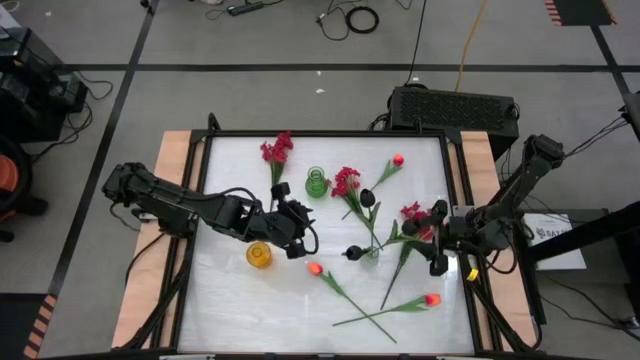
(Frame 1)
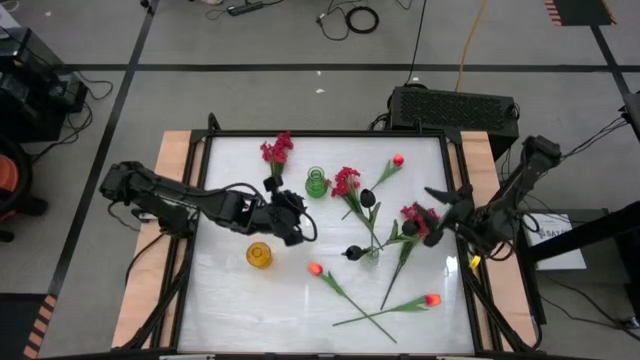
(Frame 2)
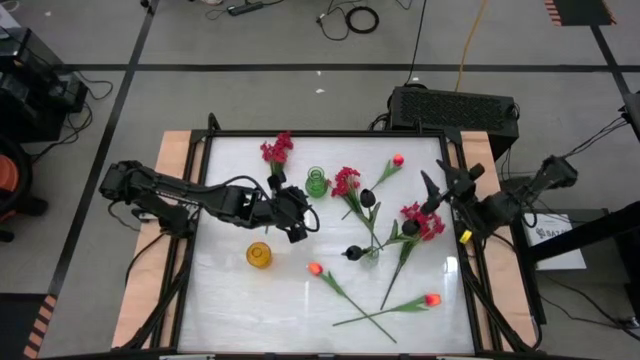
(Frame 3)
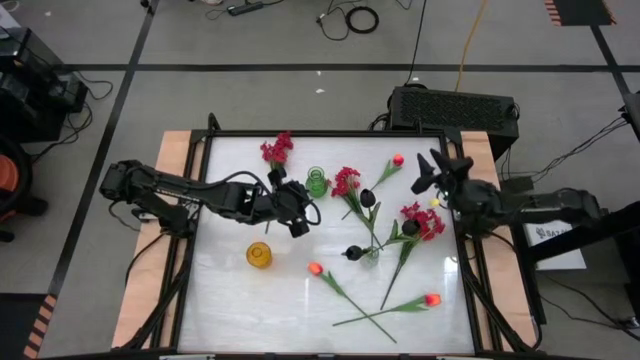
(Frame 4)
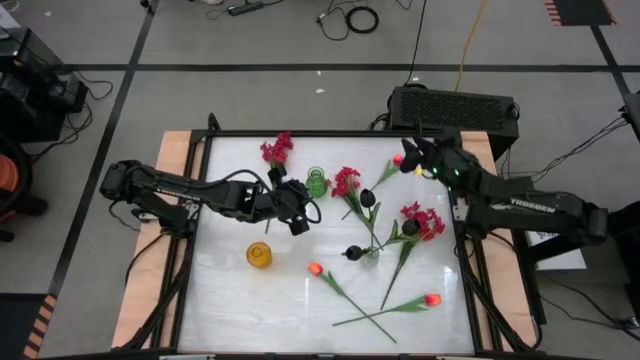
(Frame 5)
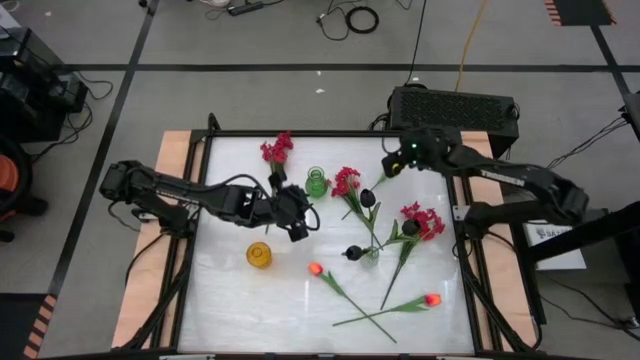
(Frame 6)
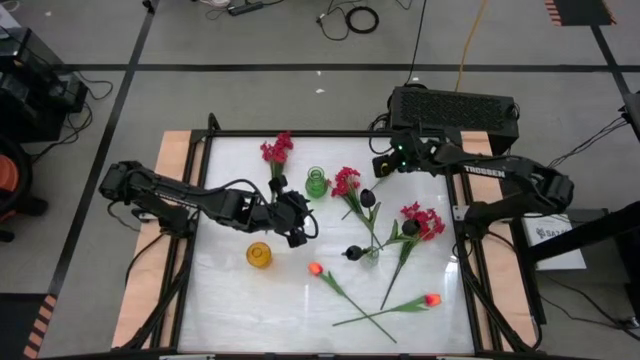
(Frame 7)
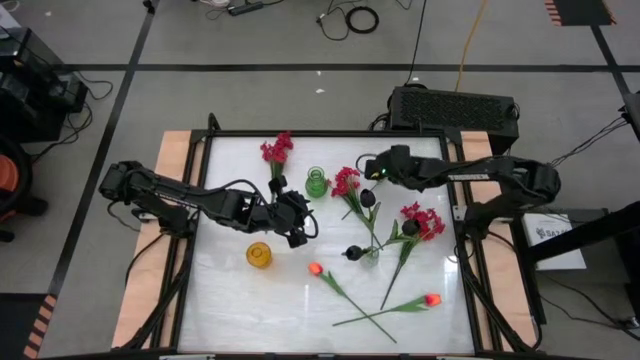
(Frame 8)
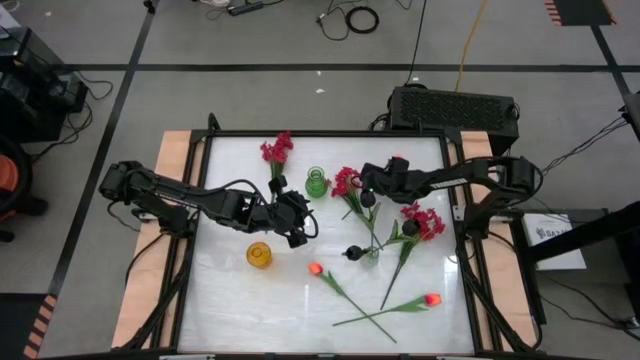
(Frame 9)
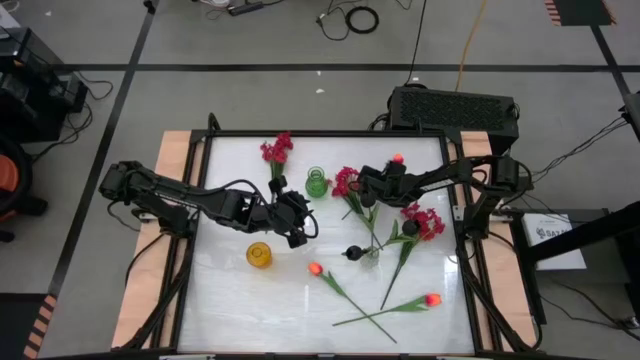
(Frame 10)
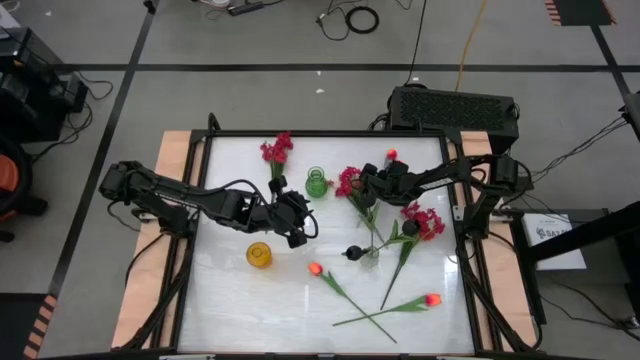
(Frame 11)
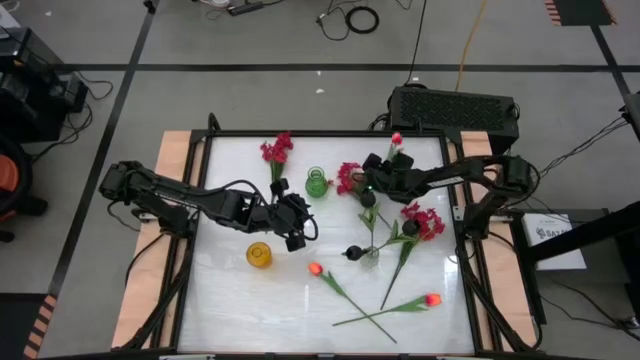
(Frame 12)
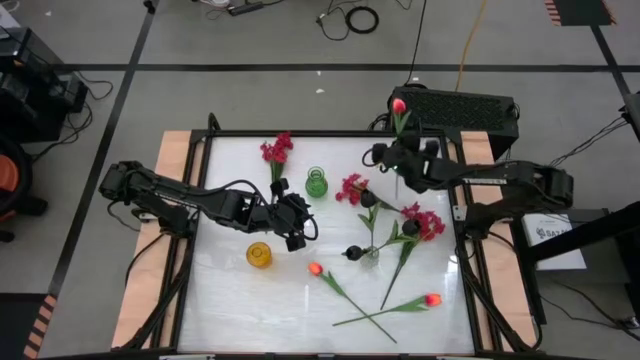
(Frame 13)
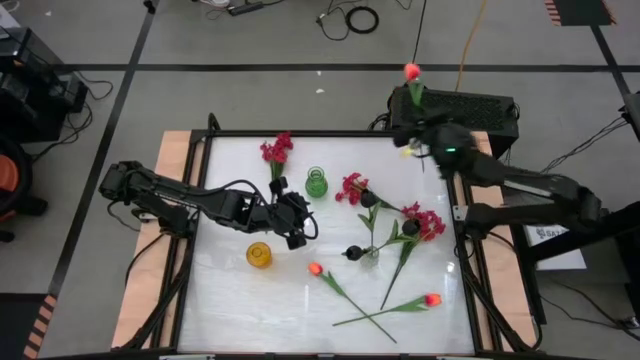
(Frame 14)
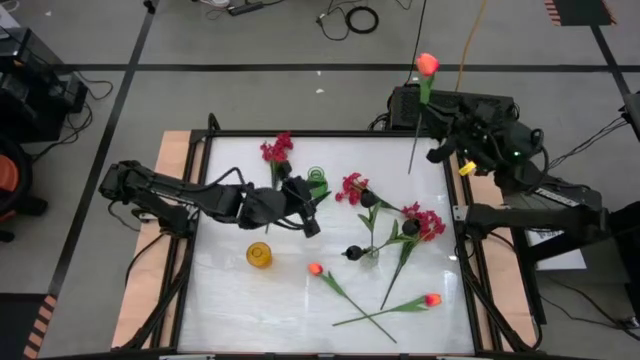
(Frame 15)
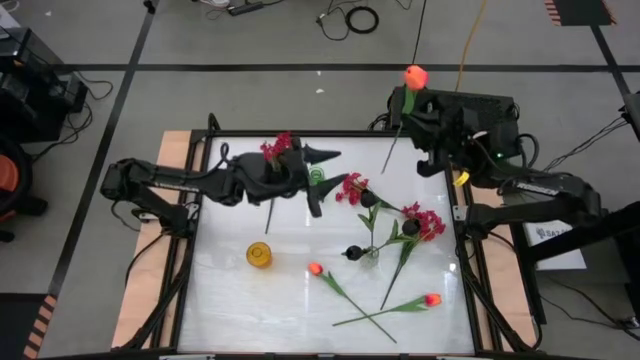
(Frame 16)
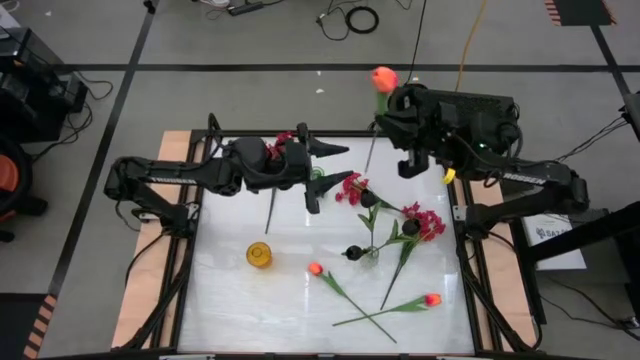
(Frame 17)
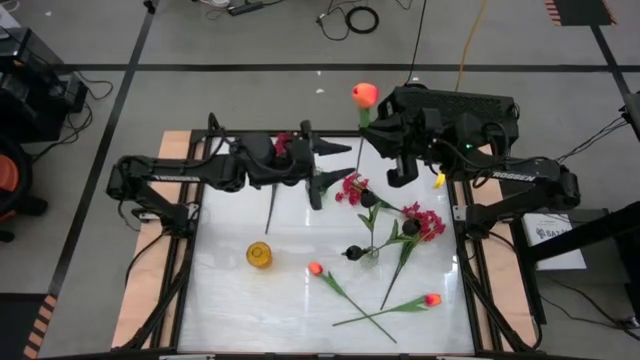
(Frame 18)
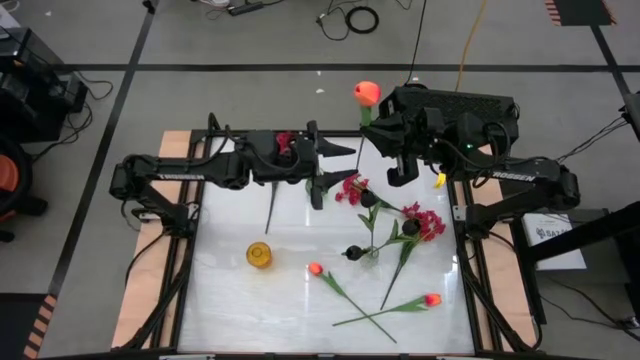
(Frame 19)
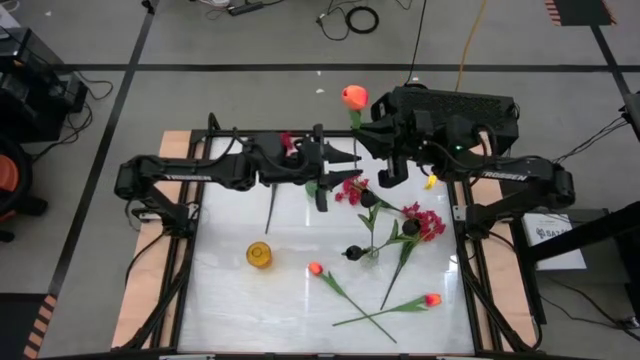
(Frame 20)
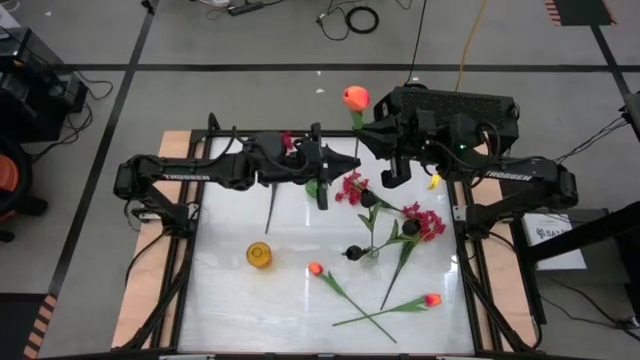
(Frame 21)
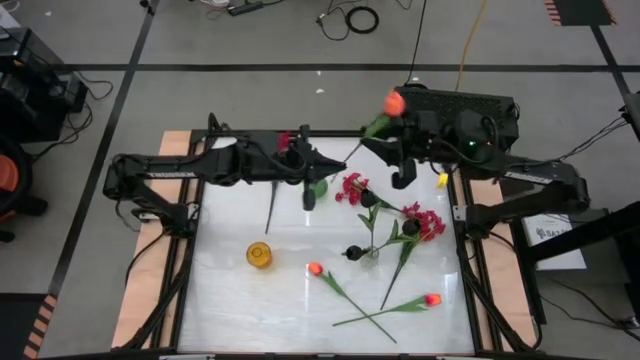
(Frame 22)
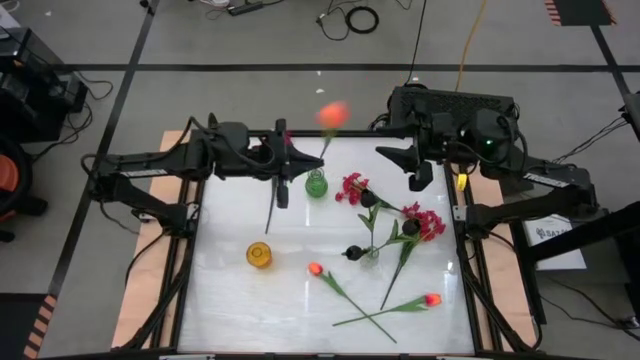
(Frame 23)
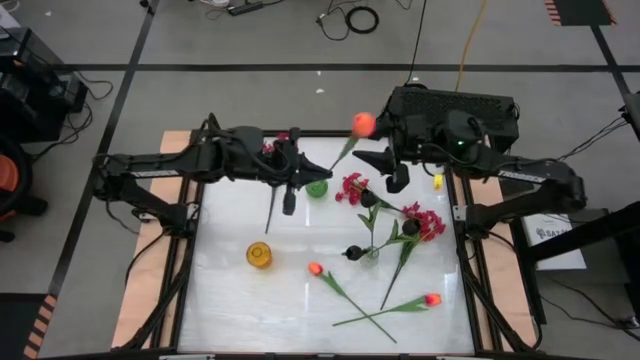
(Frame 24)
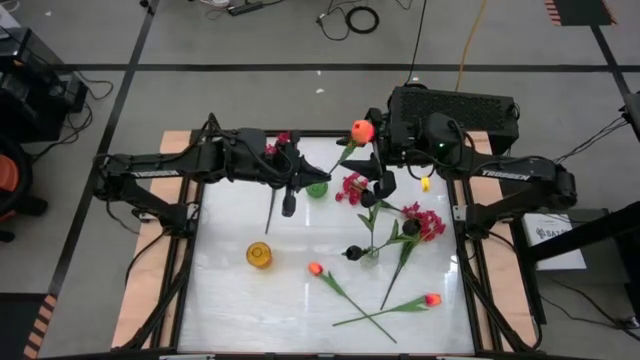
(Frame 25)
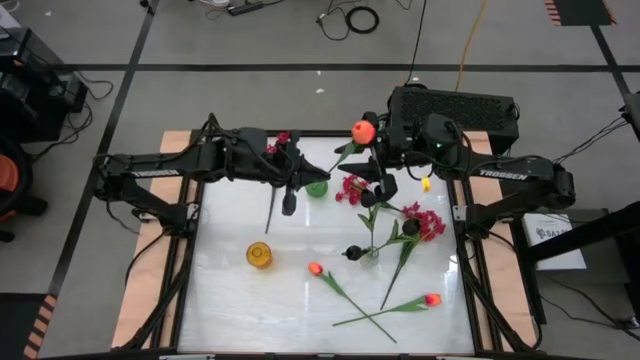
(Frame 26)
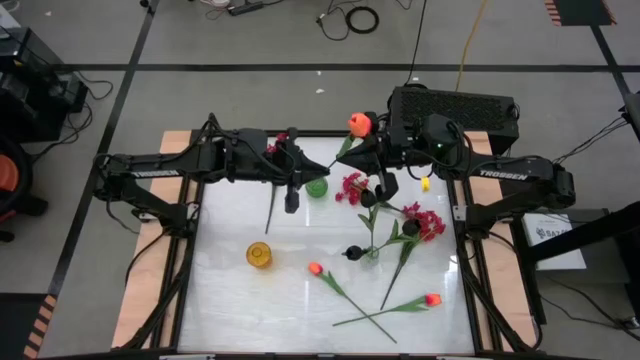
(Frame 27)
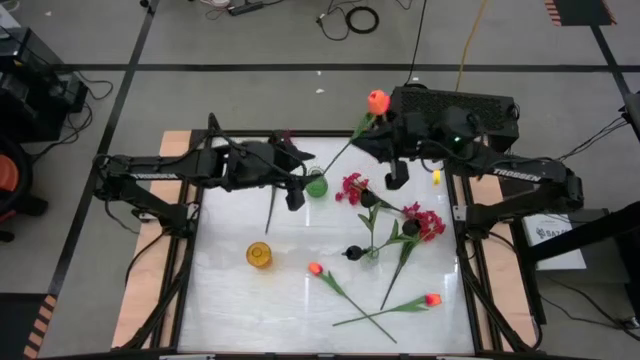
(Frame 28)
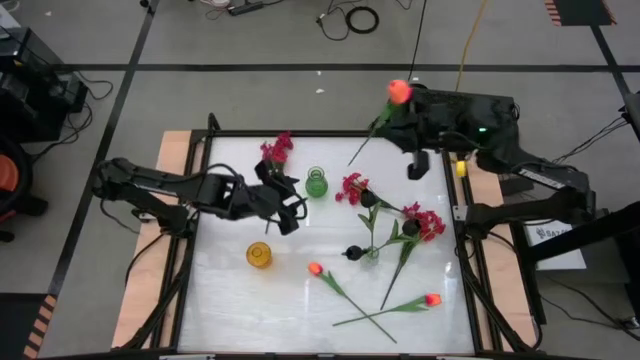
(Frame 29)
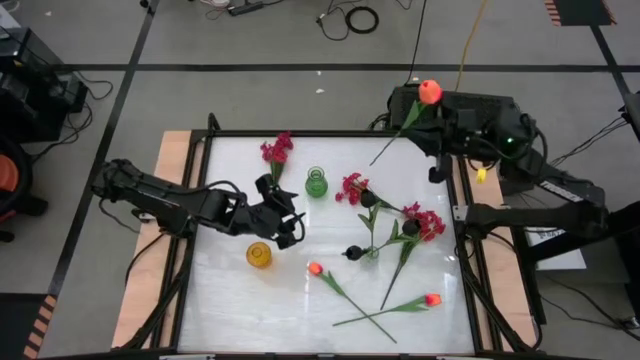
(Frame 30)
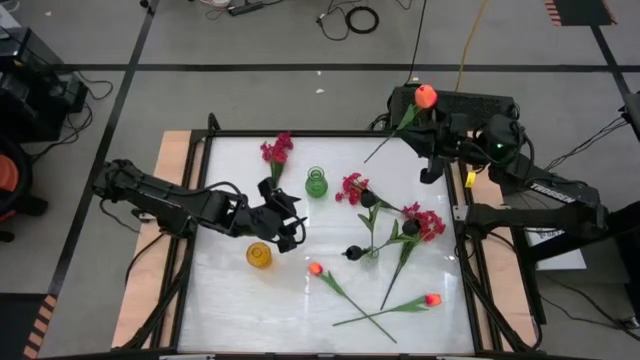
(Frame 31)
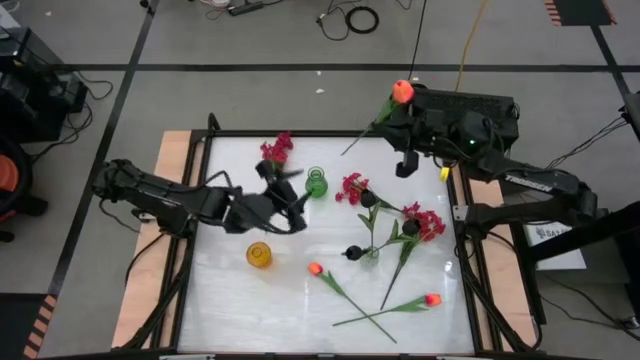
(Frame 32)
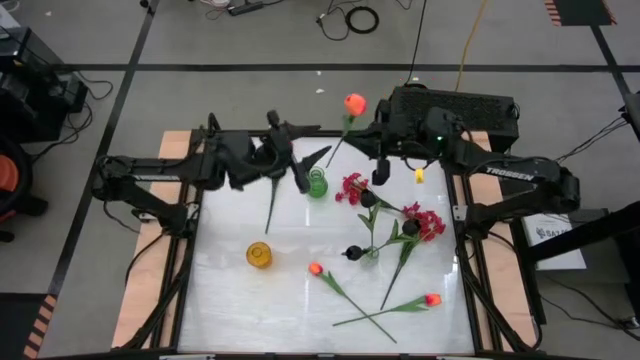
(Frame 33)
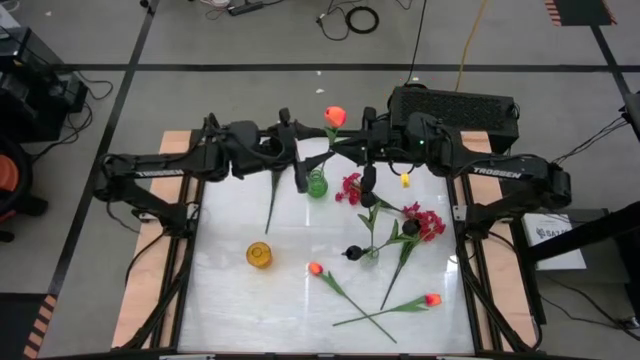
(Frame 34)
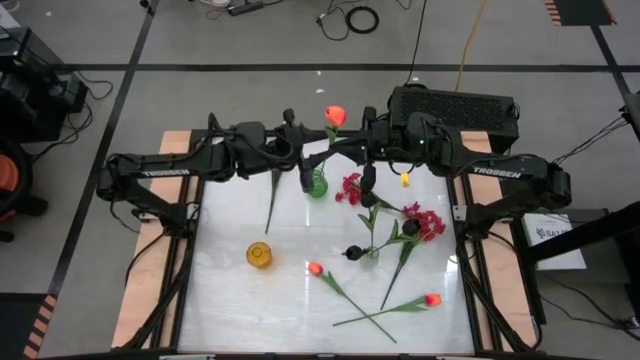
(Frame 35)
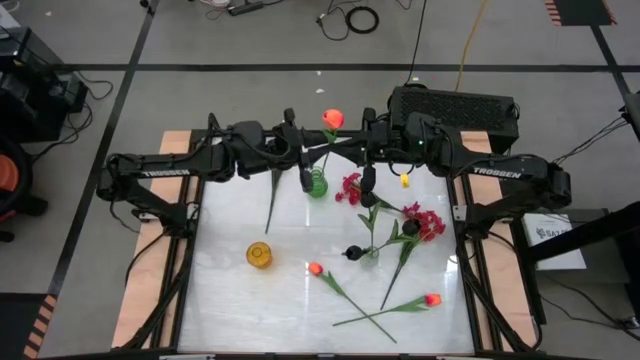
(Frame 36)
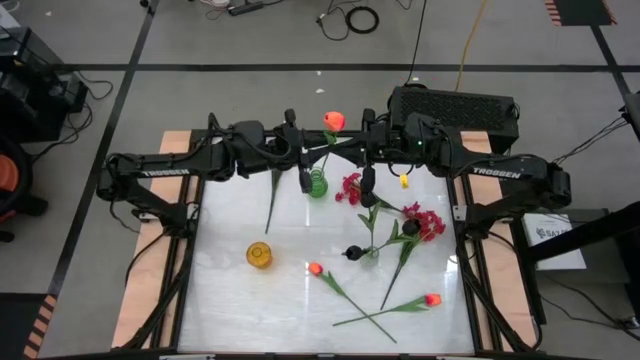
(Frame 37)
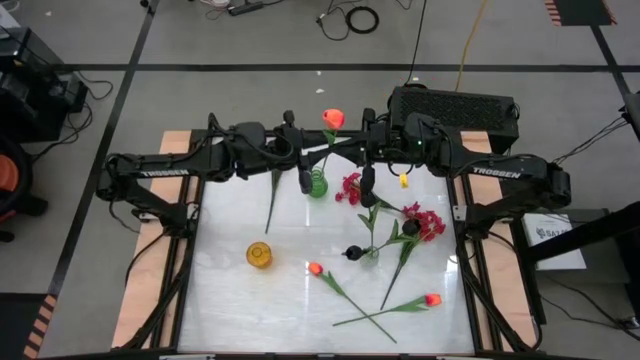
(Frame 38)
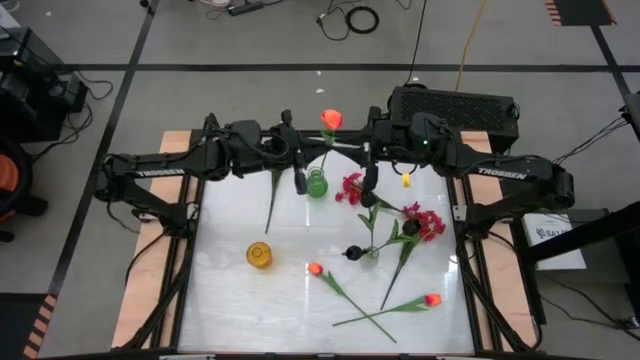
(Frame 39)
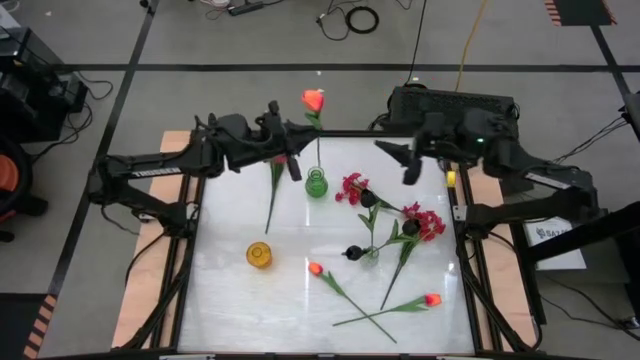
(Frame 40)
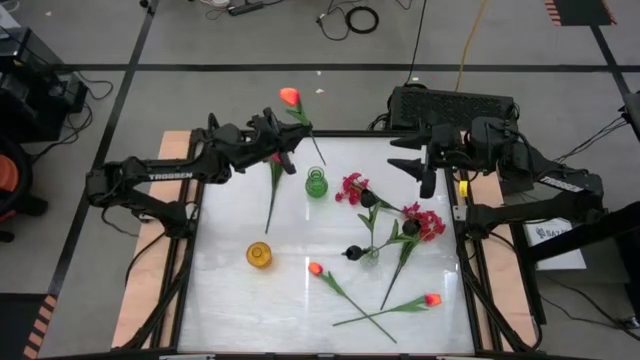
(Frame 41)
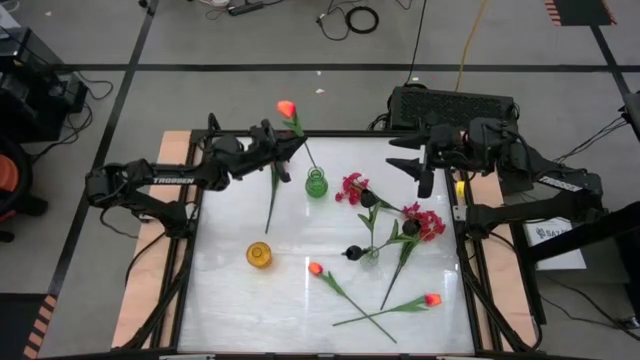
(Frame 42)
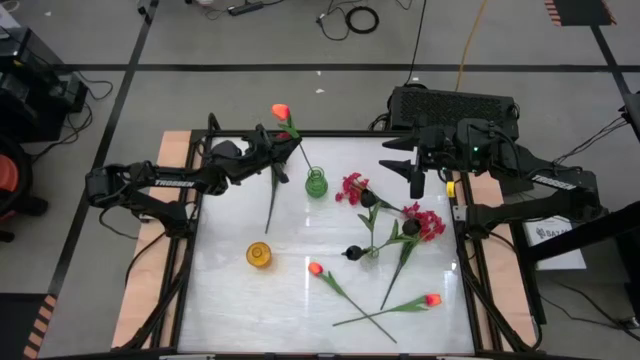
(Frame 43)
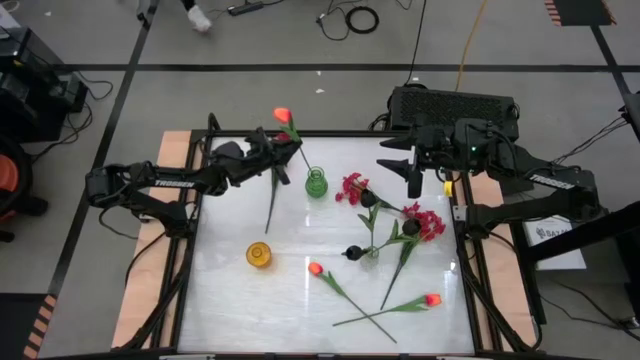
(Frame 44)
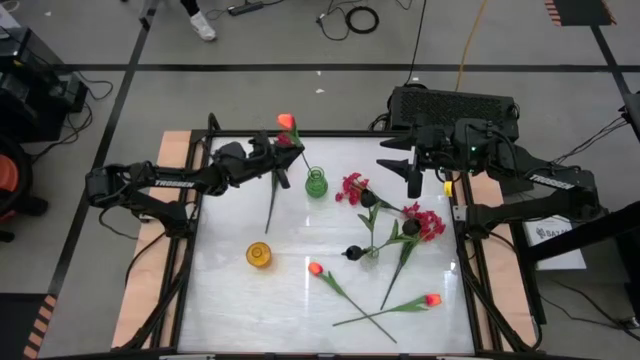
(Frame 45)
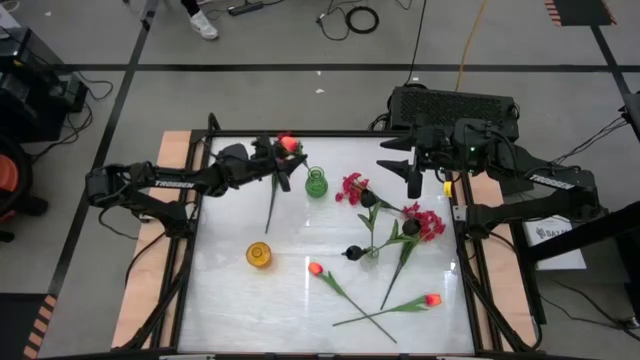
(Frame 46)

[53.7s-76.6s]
Task: Sort flowers into vase by color
Put the top orange flower into the green vase
